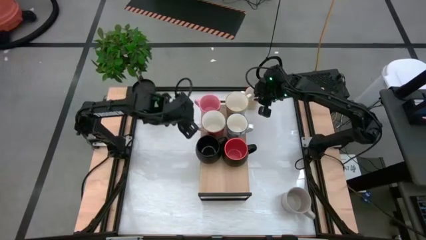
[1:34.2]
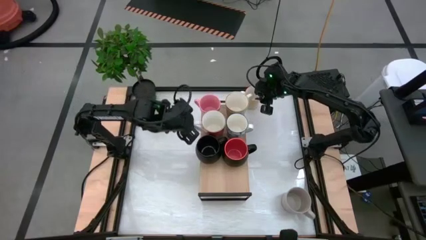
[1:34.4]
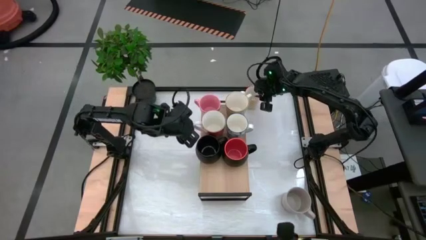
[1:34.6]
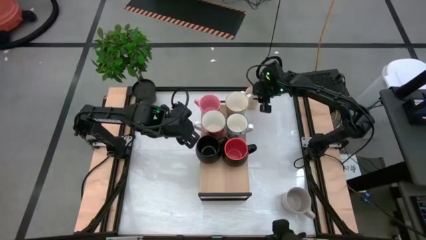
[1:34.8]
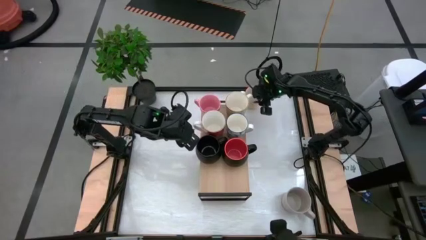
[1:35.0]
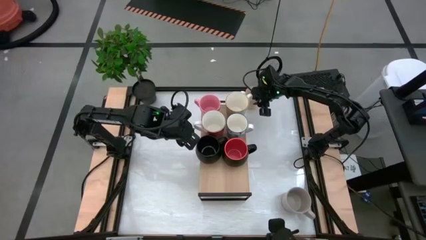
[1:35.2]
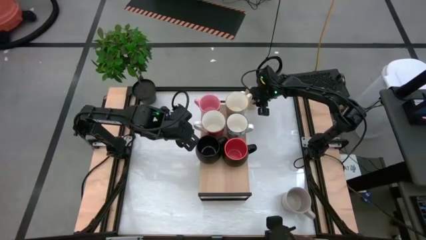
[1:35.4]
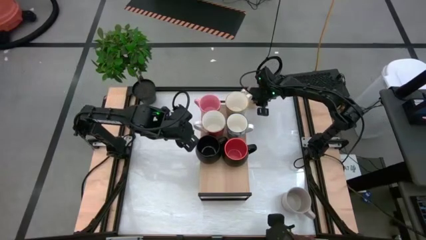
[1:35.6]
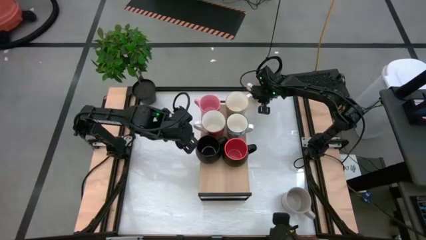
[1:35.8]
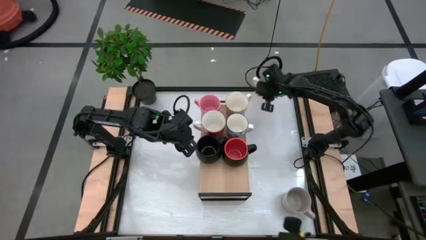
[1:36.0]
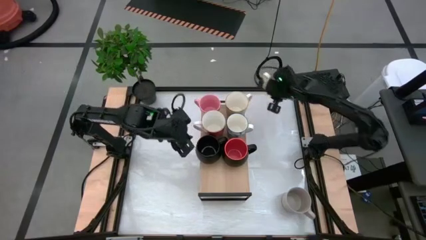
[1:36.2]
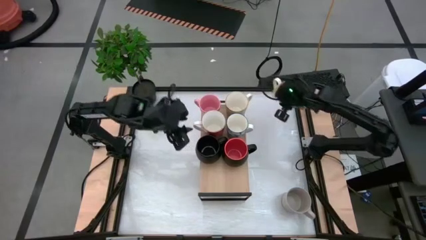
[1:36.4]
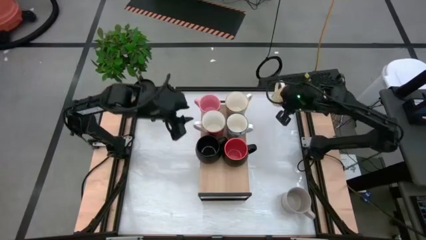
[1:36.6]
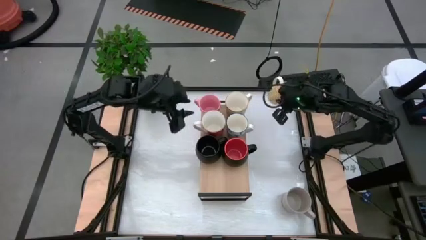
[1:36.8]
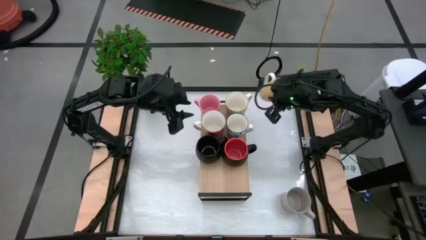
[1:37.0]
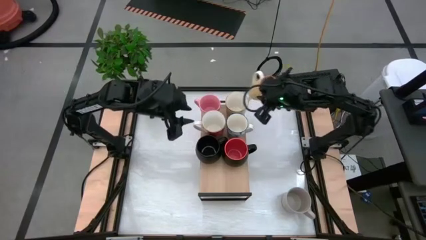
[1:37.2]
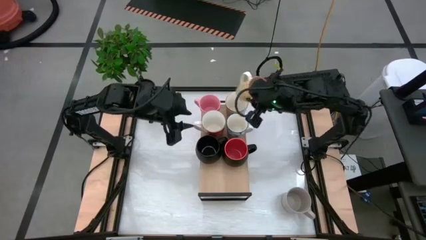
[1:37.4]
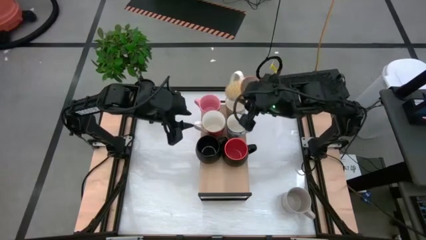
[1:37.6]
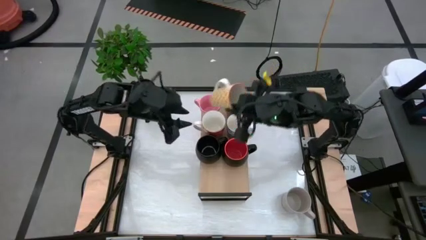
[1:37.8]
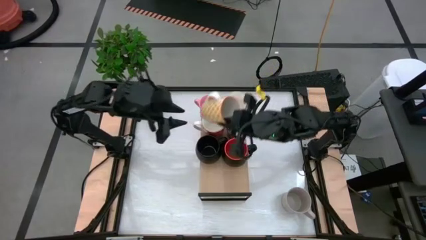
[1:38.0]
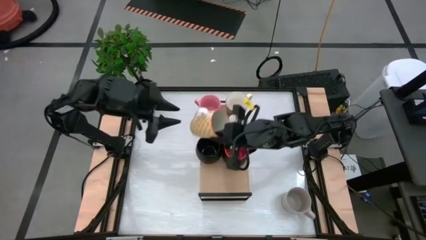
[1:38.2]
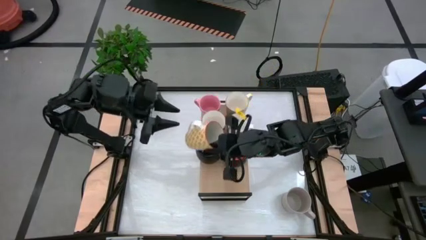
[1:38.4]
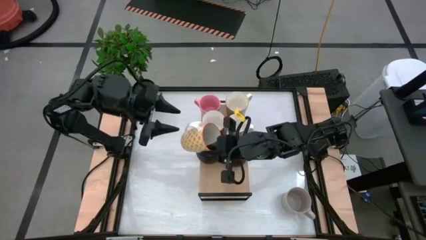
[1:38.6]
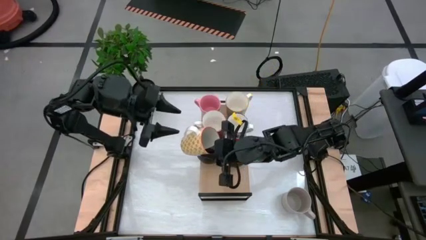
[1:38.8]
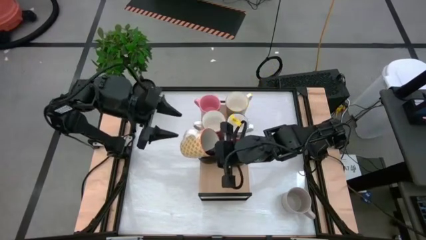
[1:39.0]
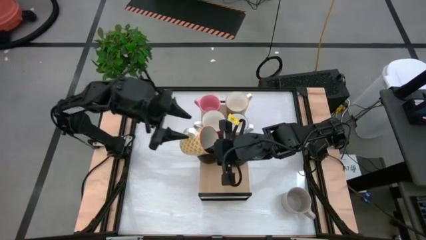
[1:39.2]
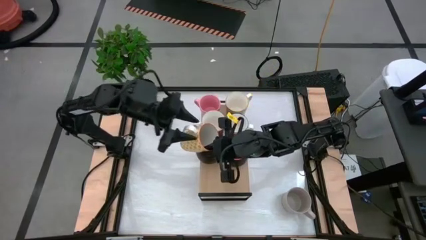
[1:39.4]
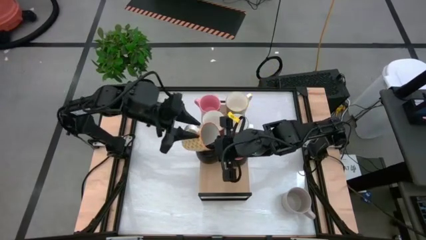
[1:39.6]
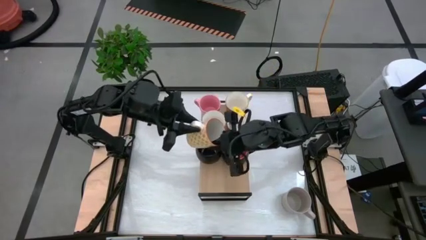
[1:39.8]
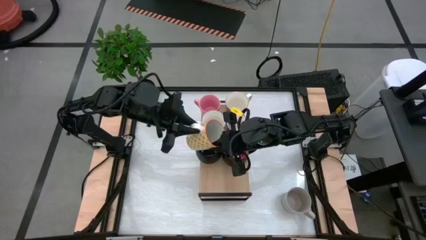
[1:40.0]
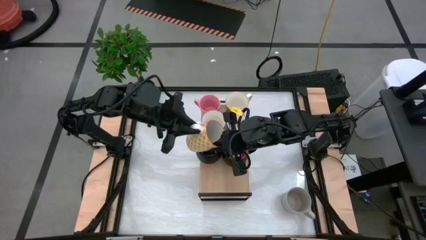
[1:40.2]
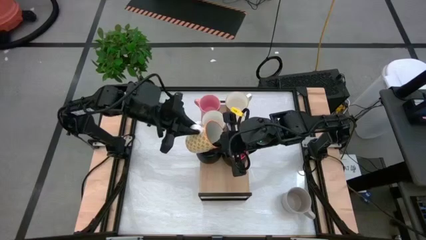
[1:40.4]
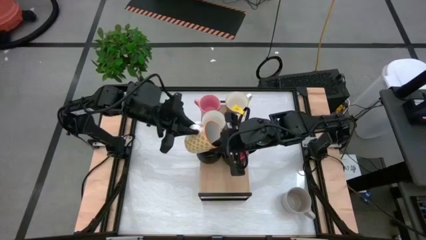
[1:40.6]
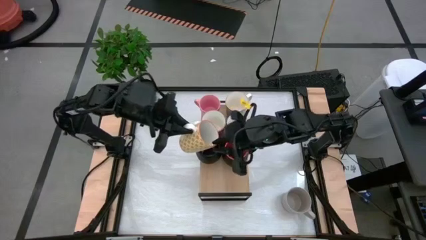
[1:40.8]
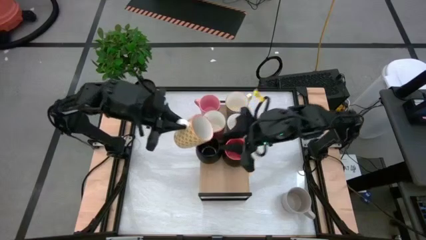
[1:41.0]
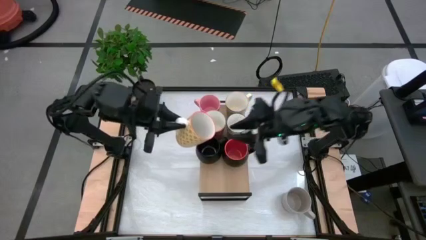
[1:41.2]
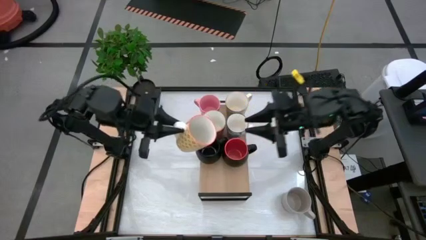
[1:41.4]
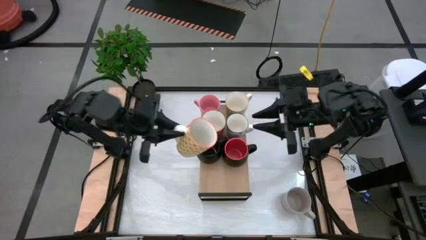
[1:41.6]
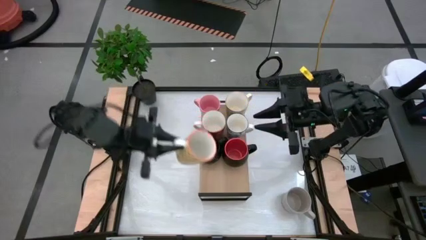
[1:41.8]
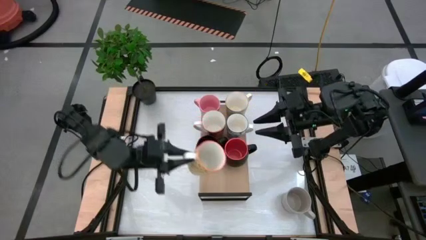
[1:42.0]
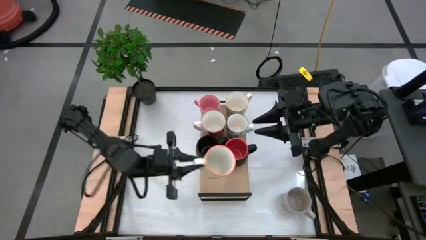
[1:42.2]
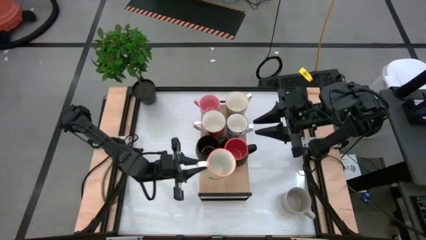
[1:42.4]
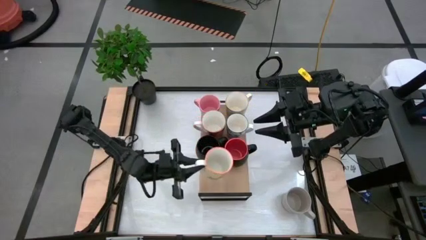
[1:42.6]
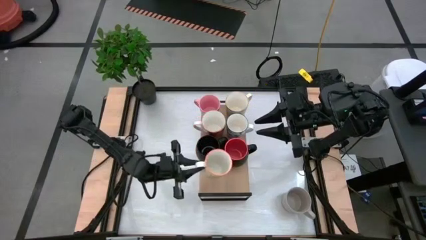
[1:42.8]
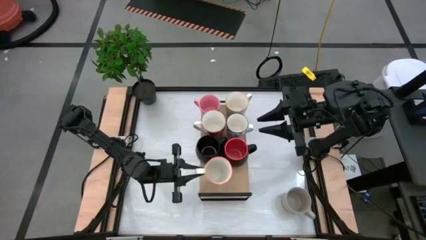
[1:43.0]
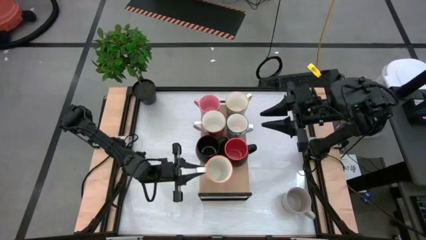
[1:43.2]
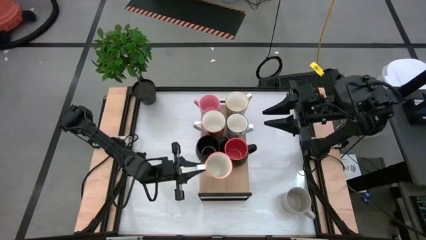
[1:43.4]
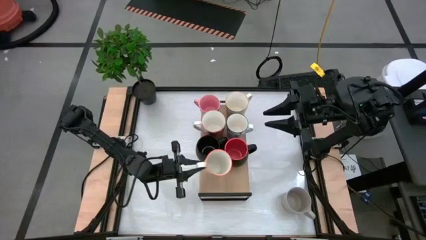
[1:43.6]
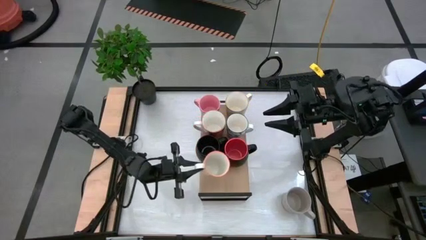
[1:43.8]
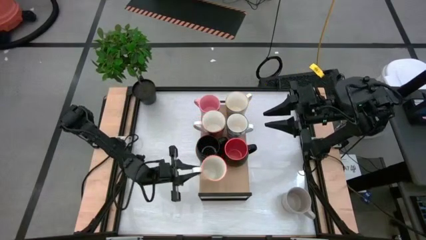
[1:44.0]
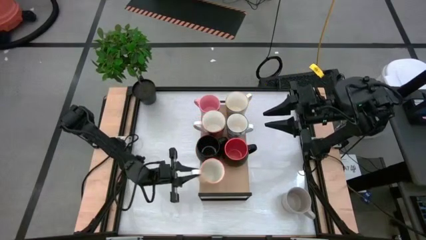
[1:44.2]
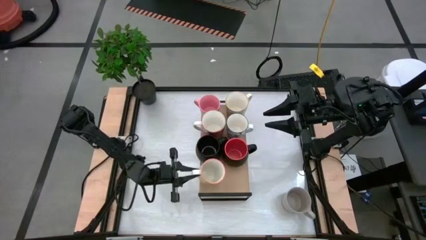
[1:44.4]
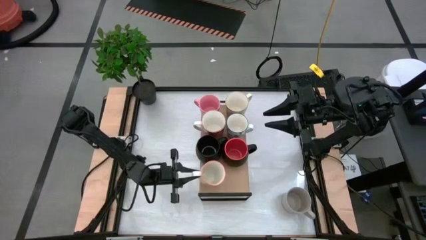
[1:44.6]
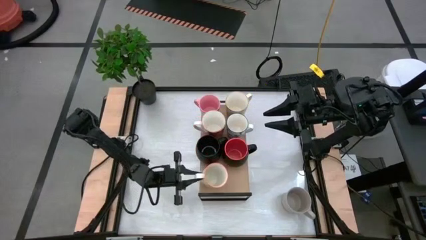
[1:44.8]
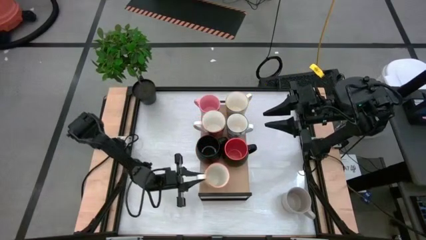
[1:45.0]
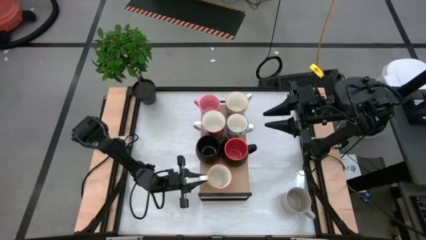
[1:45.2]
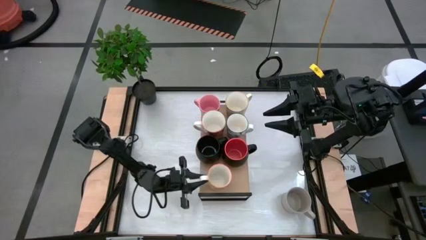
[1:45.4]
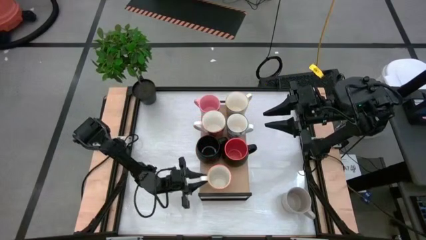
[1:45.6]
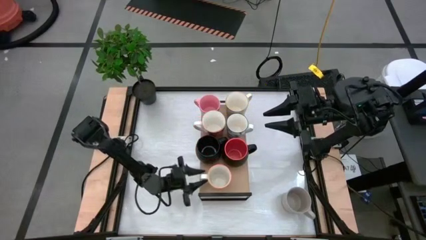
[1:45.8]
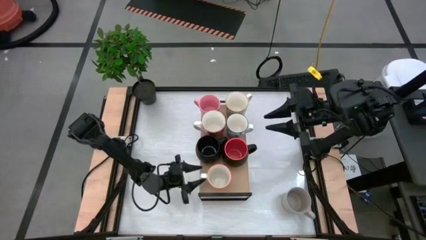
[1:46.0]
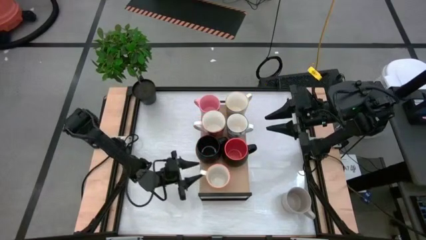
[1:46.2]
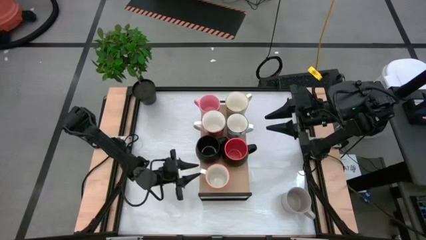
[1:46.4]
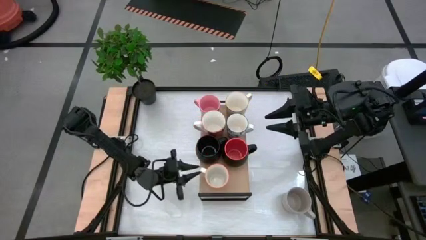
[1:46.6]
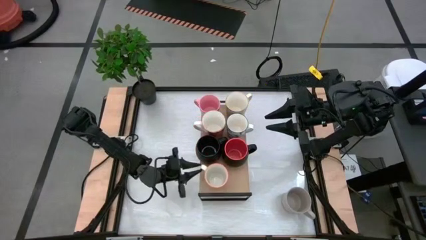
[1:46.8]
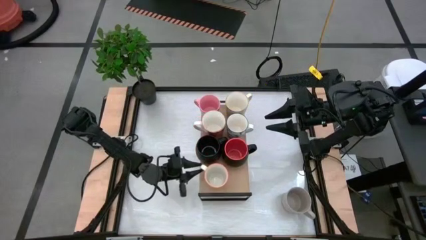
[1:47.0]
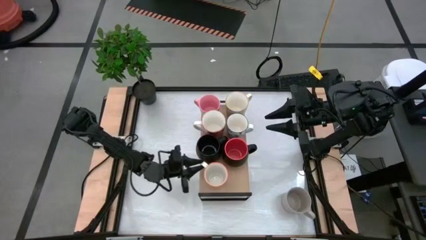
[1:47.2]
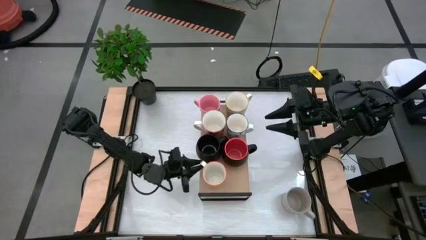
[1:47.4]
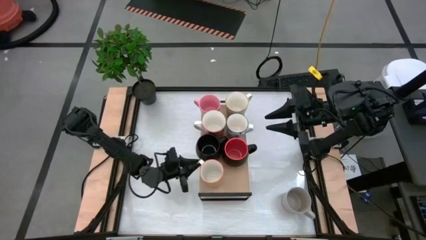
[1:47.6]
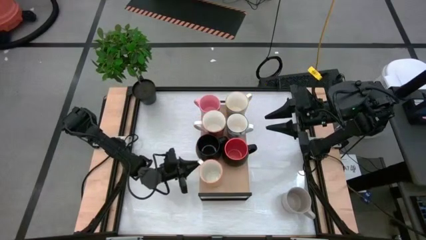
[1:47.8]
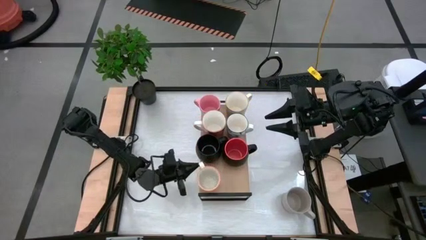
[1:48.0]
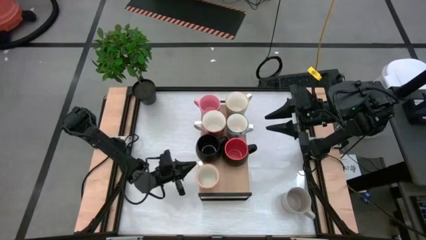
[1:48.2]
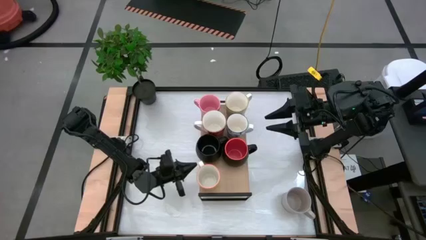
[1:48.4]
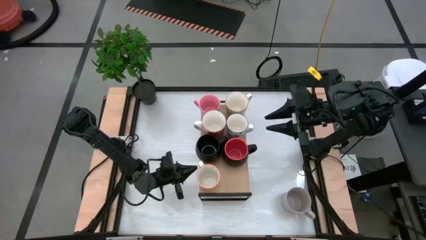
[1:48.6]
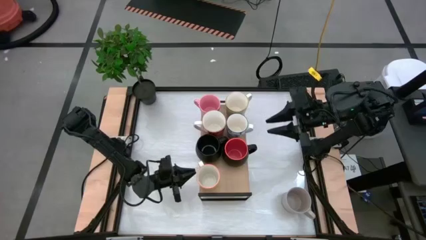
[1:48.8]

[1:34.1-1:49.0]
Task: Place coffee mugs
Put the yellow mug on the shelf
